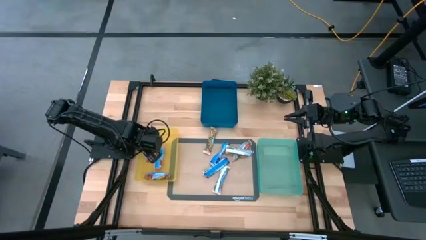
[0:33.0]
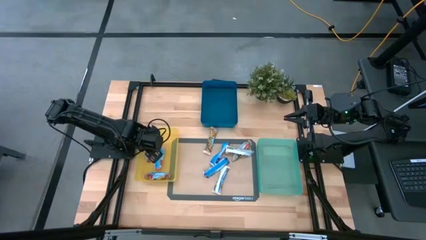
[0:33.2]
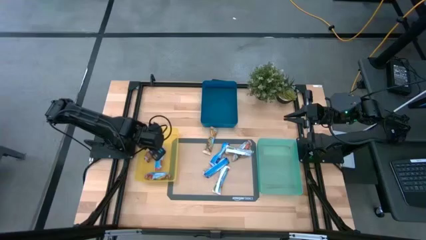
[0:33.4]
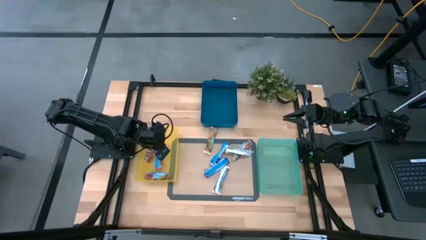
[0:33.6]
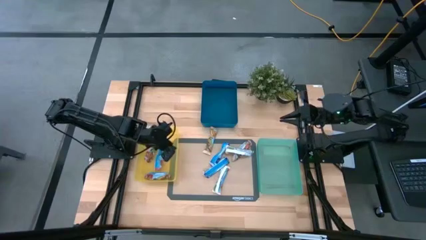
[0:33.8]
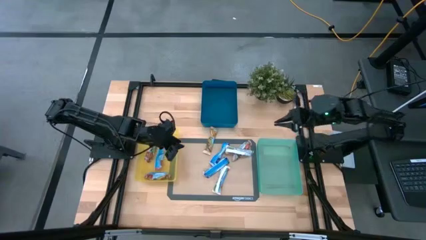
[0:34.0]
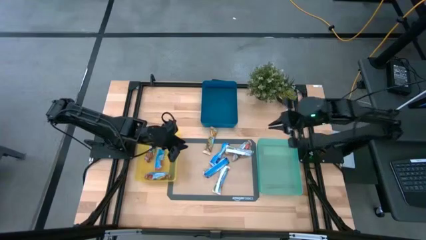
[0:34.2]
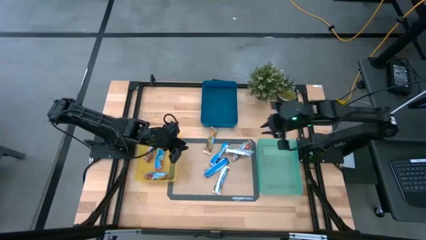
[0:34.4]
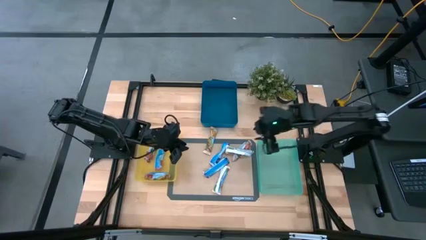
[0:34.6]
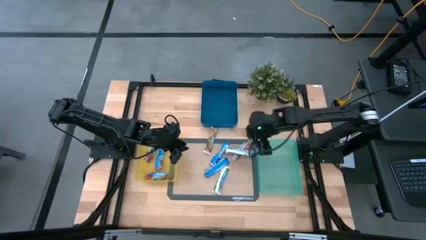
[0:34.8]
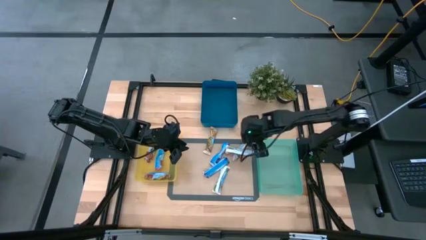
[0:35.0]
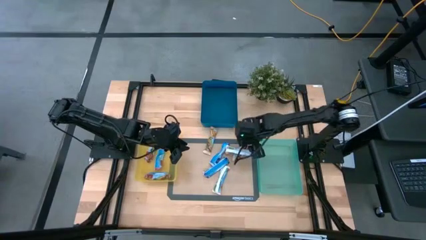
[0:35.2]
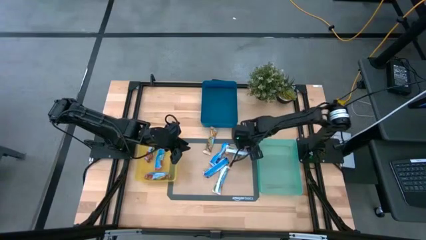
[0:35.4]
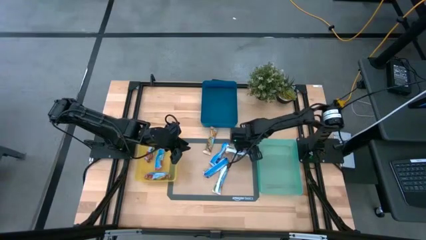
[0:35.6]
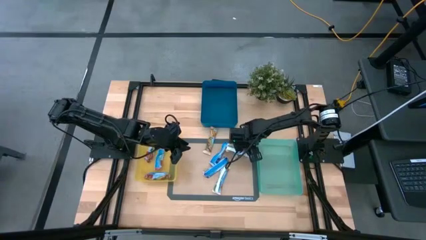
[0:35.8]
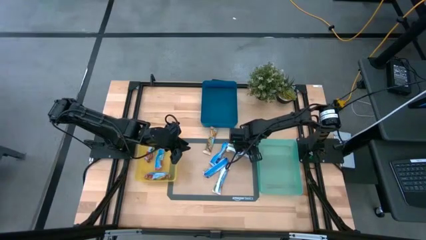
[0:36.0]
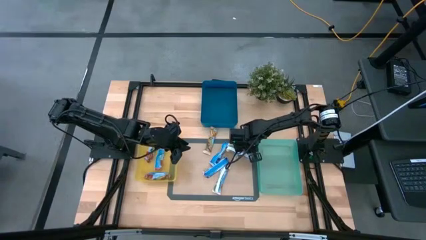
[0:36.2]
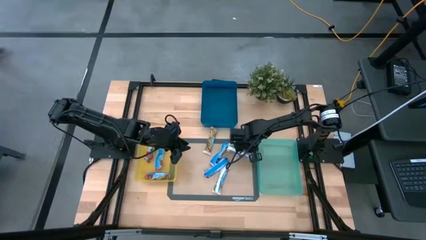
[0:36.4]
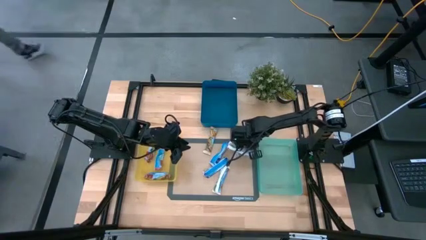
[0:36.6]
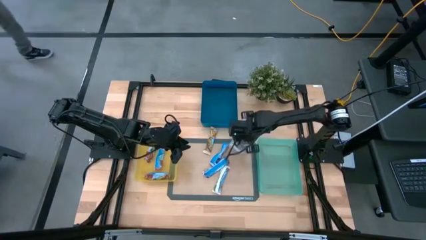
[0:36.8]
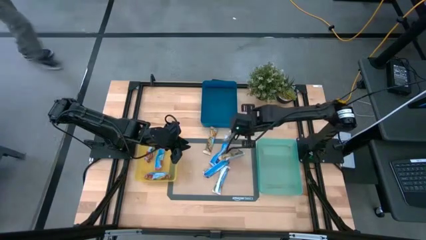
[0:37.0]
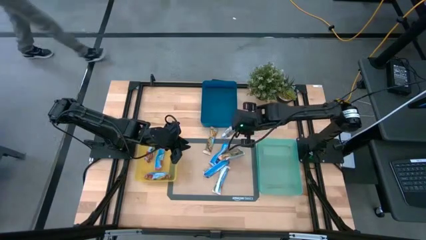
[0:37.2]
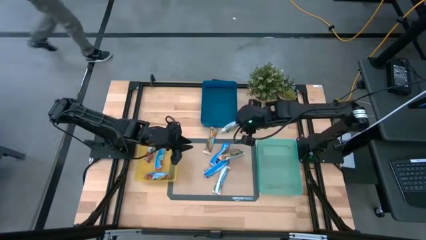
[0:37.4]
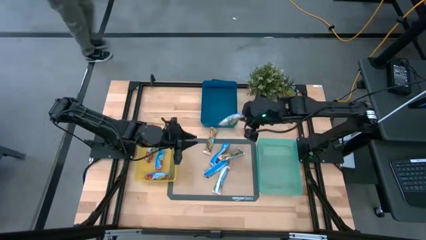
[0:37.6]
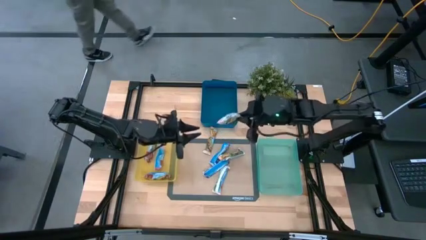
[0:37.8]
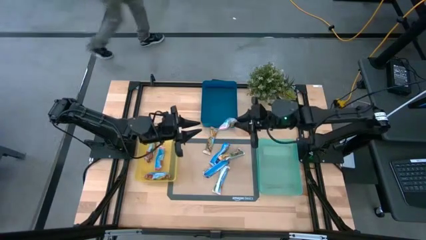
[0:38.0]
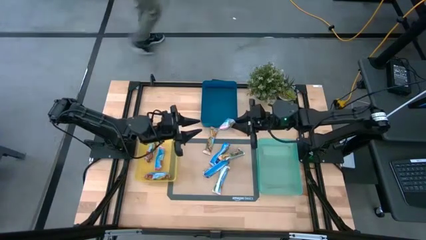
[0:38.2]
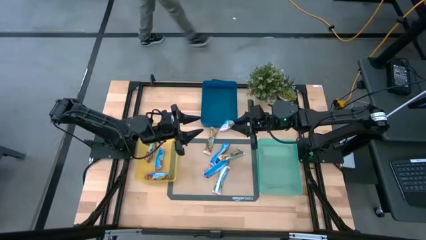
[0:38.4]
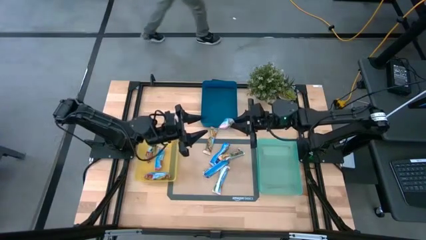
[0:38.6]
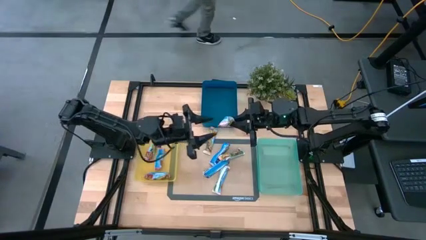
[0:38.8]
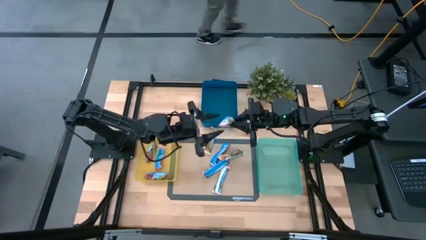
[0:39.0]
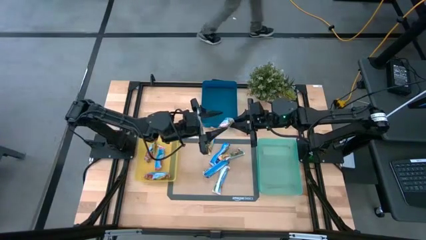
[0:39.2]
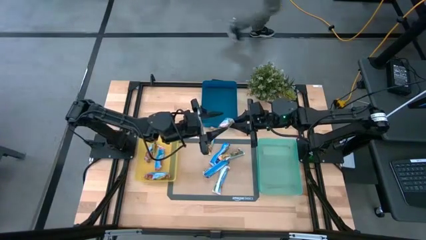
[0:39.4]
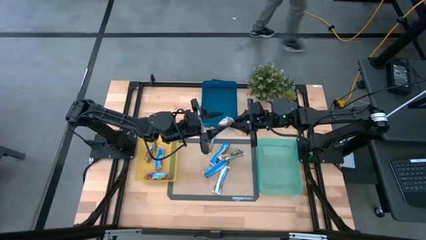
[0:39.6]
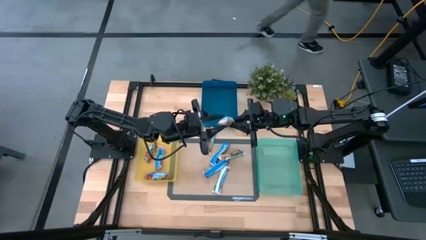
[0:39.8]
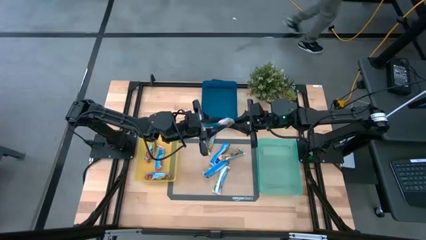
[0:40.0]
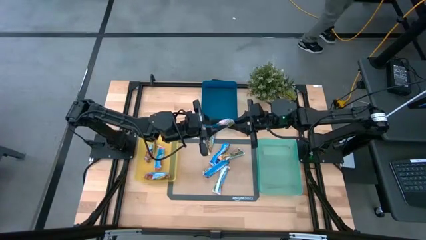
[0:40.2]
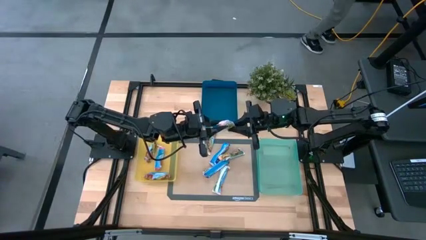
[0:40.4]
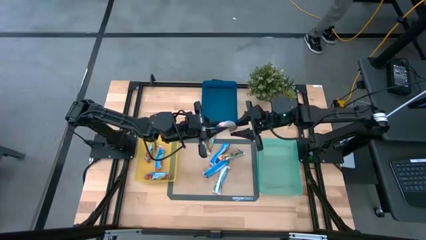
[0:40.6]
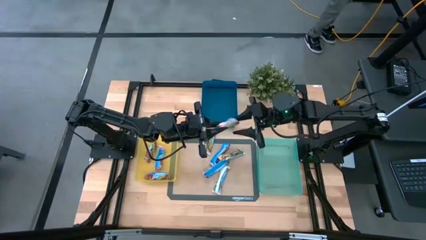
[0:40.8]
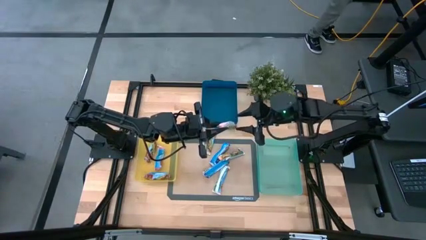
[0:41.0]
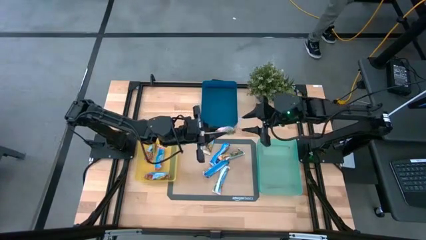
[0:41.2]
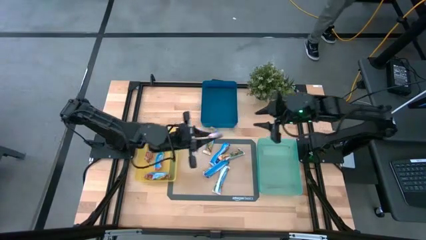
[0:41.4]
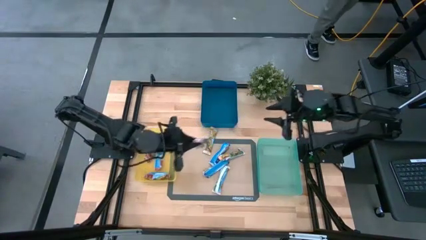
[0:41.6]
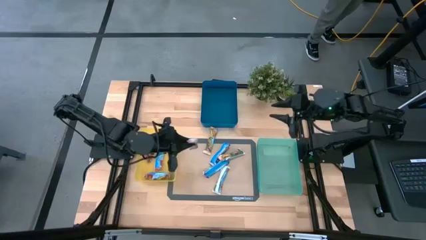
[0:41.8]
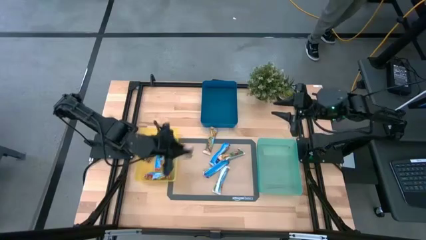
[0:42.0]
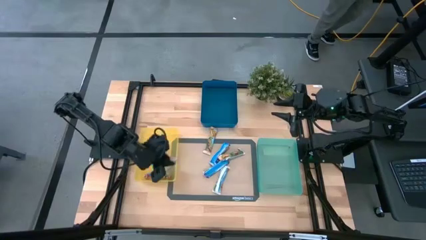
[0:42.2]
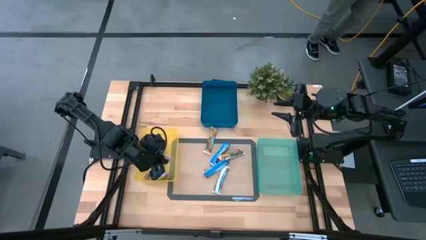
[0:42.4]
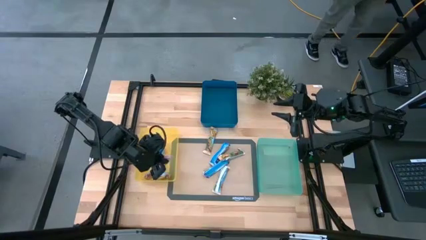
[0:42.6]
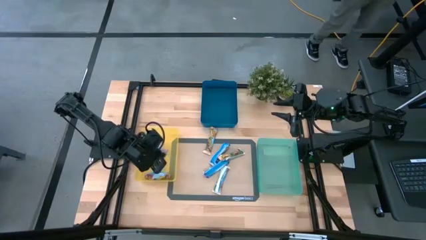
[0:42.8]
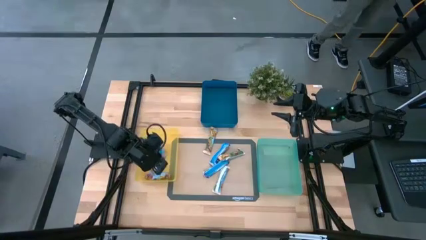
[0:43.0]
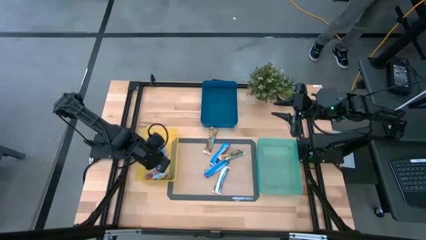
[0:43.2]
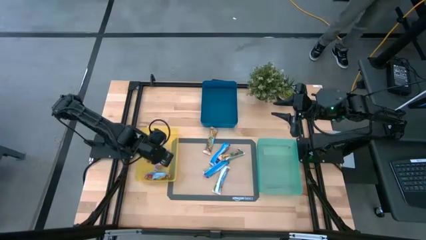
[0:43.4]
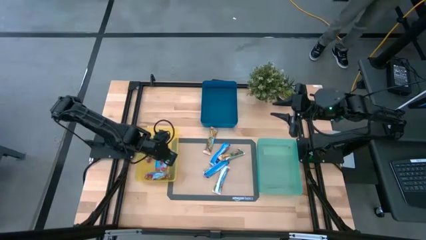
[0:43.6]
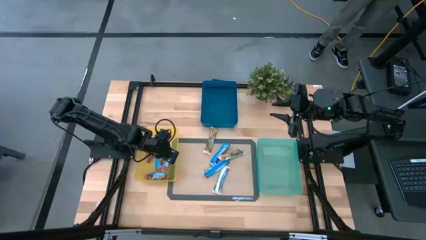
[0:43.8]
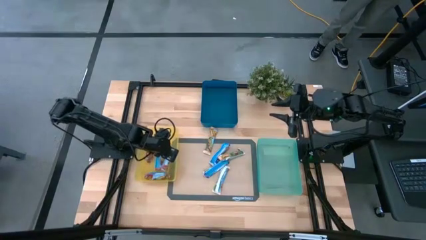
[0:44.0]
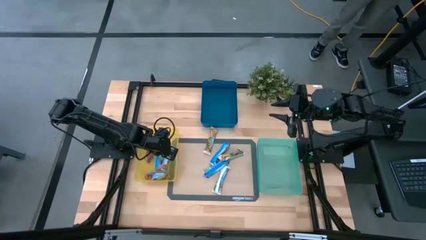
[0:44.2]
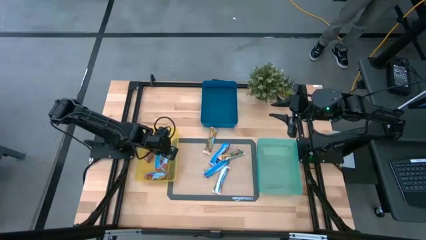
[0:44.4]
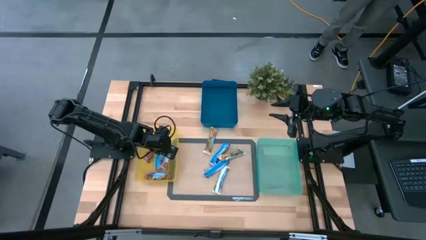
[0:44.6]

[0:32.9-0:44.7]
Task: Pick and place Granola Bars by type
Put the red granola bar into the yellow bin

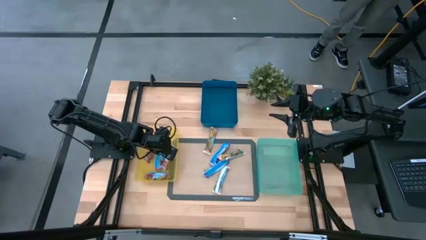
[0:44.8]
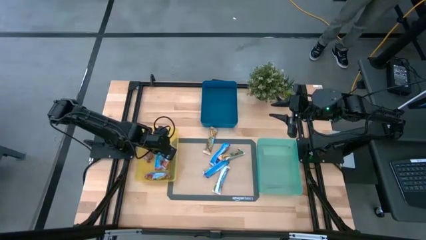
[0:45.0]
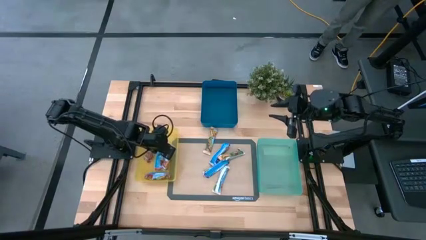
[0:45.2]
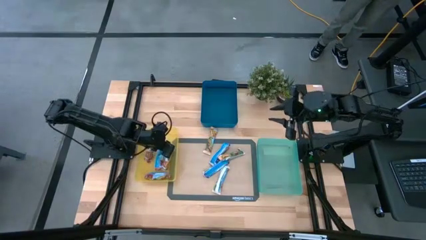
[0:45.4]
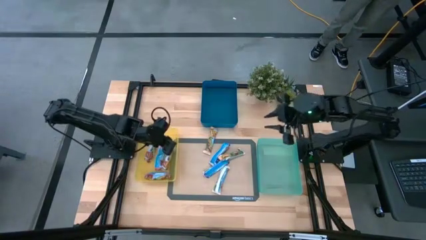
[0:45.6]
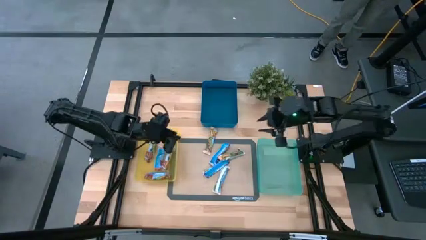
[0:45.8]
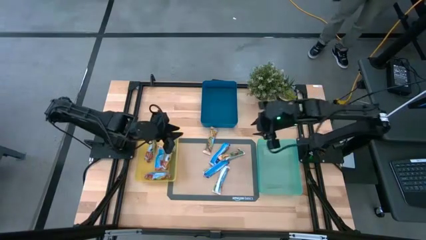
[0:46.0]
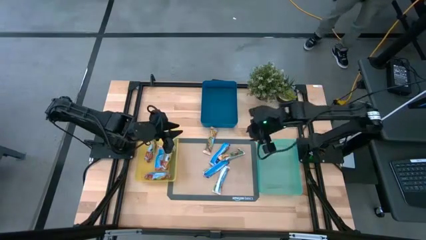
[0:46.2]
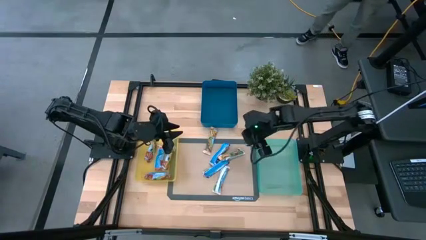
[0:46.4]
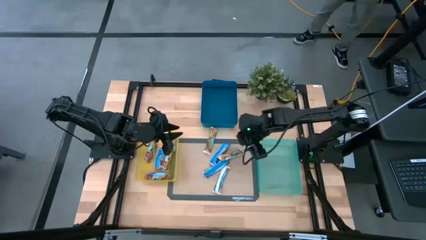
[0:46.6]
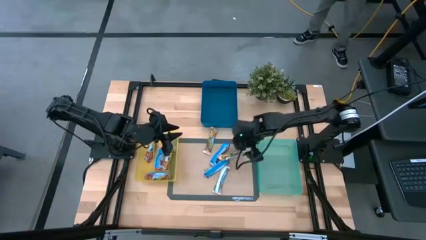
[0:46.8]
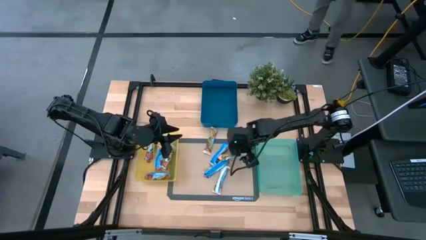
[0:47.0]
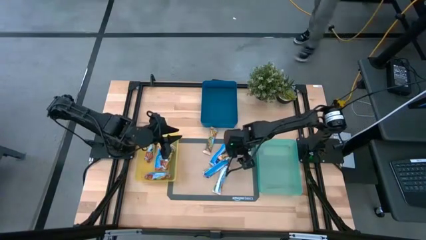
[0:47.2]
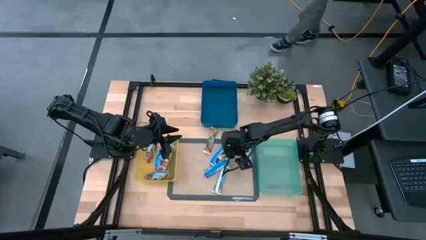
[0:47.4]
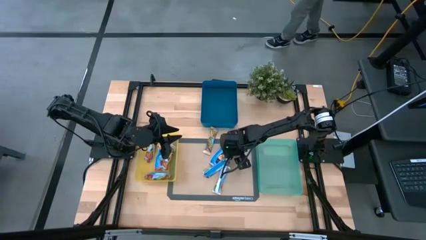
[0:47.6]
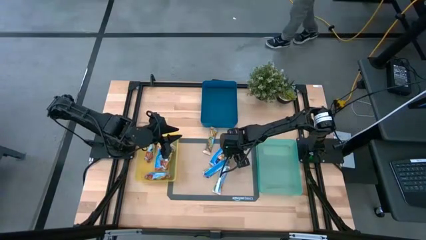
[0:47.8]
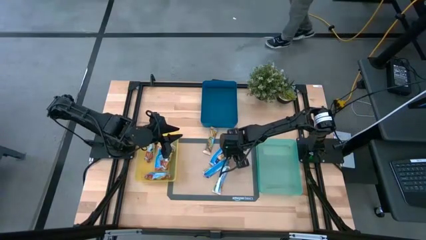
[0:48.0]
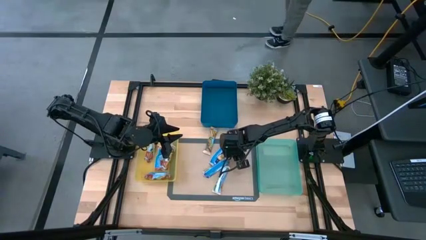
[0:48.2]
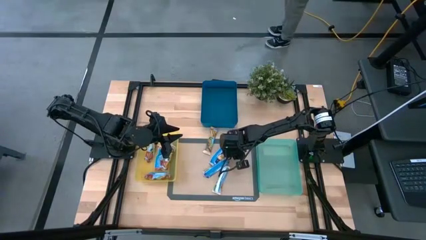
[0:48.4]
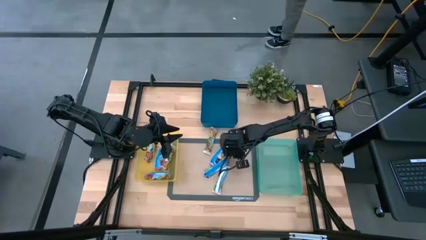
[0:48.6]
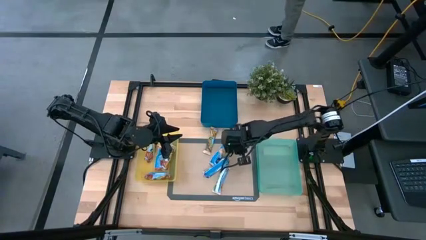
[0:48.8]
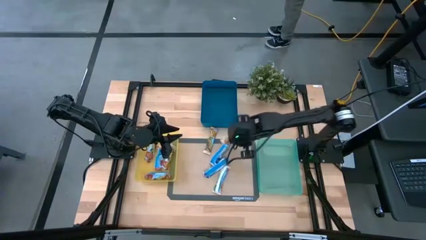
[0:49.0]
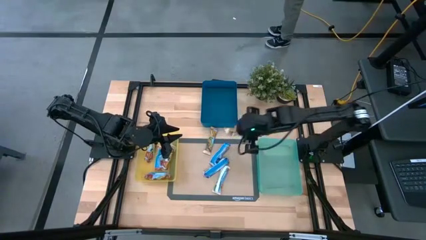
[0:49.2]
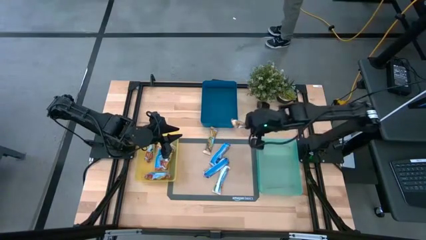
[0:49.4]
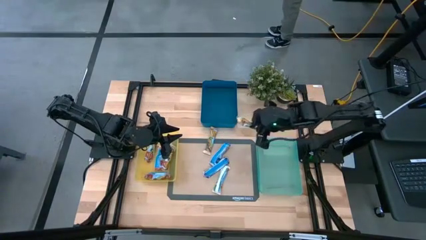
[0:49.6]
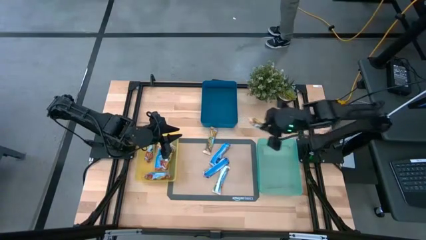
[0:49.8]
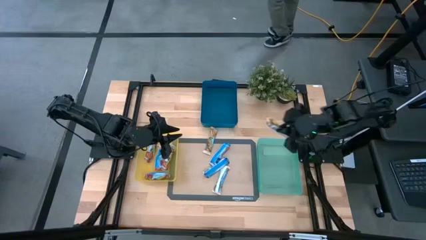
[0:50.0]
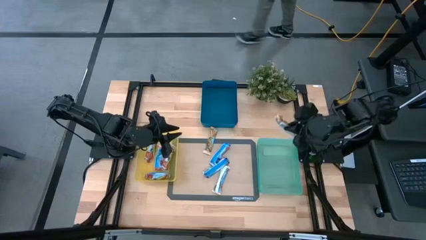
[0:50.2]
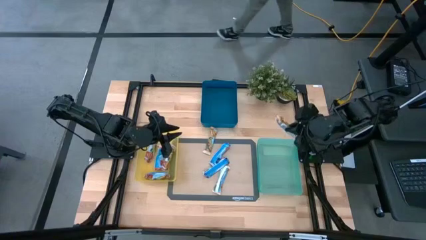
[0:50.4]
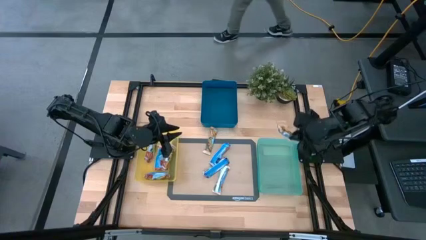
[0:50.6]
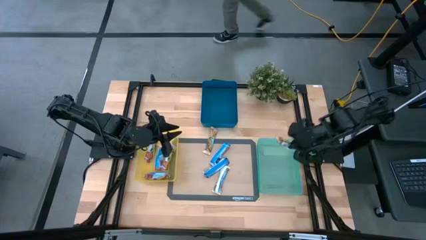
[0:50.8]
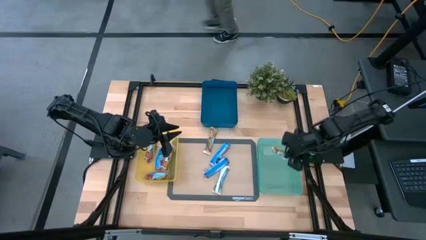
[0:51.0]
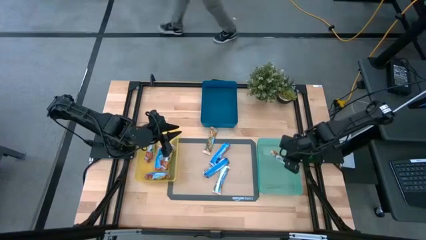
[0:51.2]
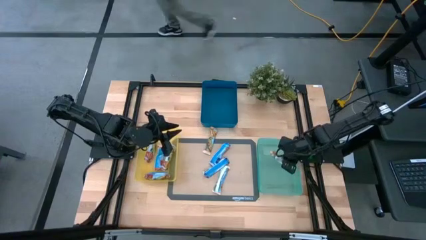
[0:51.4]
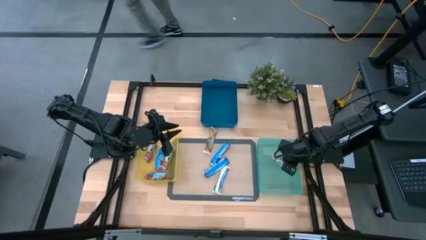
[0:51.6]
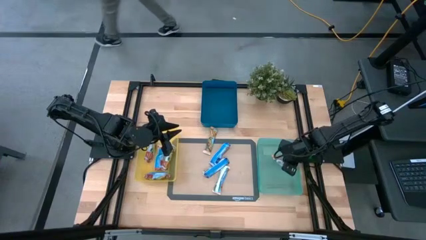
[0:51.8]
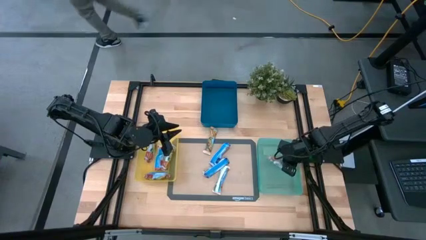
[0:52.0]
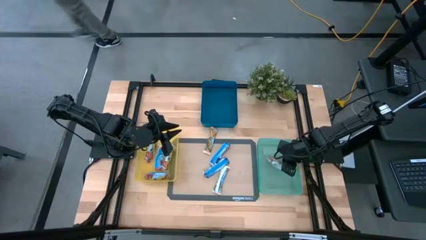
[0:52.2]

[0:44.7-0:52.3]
Put the yellow granola bar into the green bin
